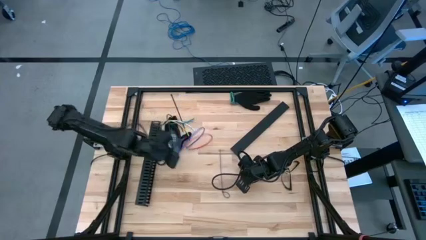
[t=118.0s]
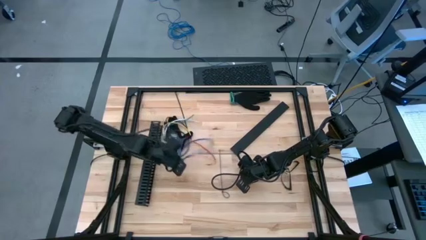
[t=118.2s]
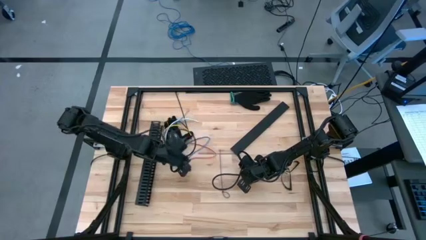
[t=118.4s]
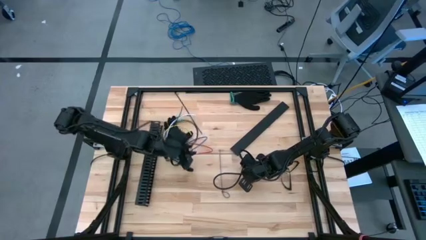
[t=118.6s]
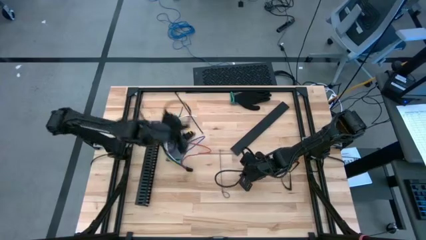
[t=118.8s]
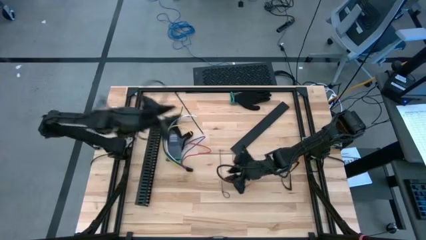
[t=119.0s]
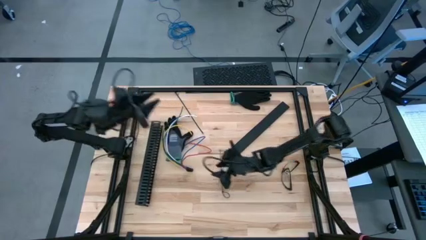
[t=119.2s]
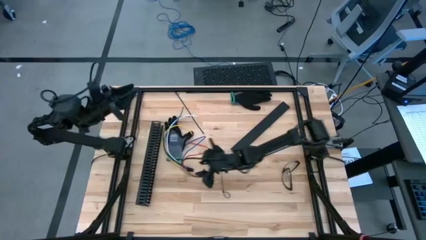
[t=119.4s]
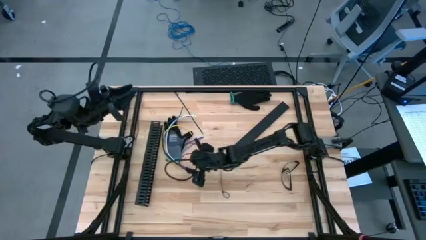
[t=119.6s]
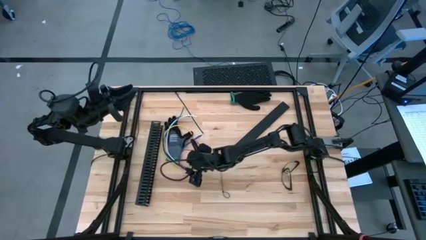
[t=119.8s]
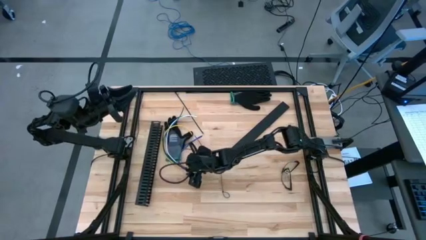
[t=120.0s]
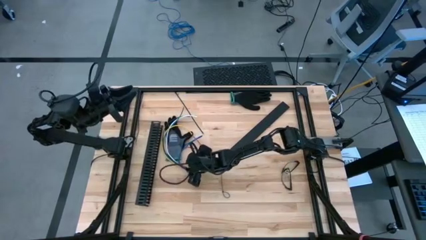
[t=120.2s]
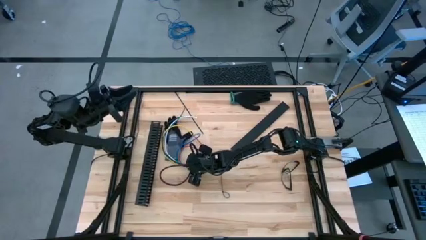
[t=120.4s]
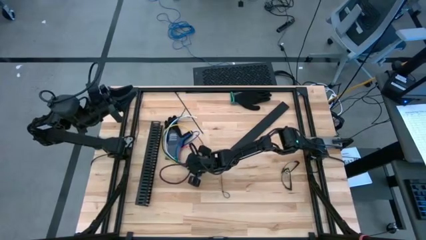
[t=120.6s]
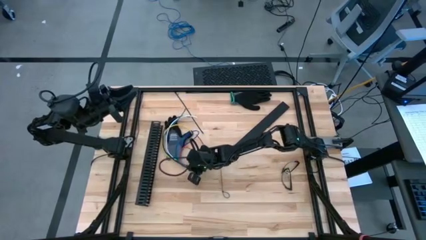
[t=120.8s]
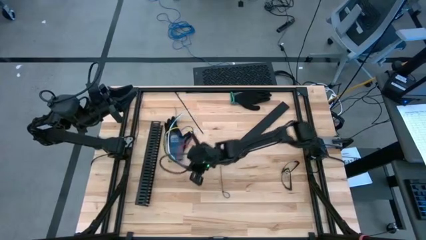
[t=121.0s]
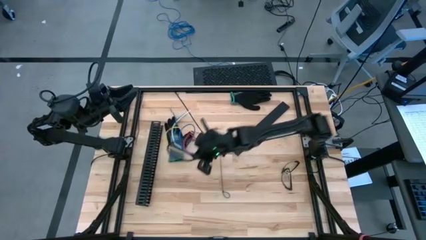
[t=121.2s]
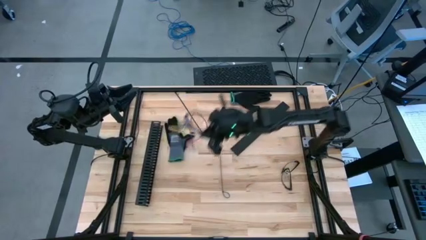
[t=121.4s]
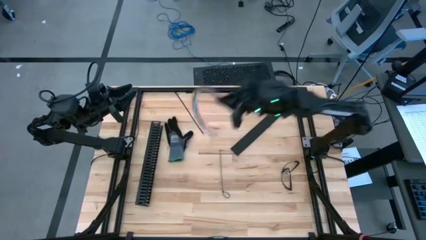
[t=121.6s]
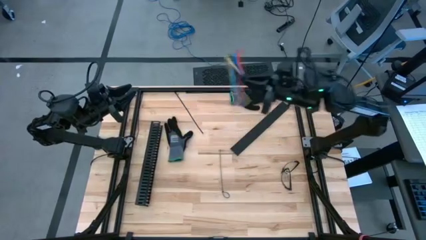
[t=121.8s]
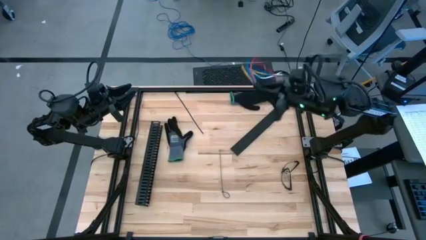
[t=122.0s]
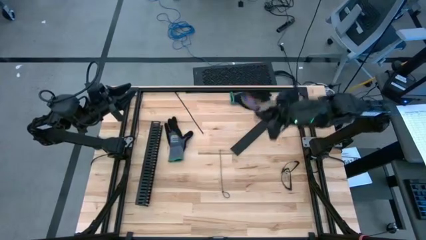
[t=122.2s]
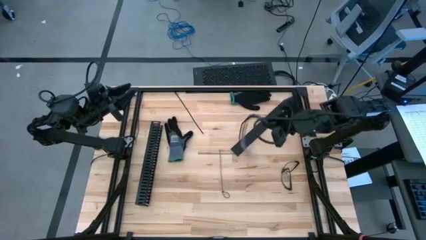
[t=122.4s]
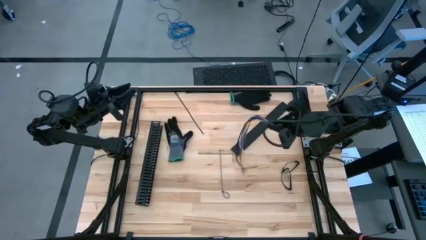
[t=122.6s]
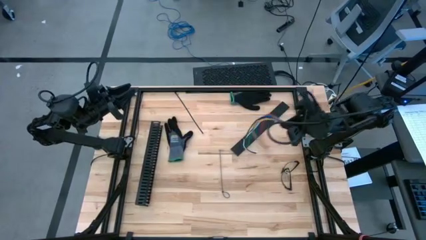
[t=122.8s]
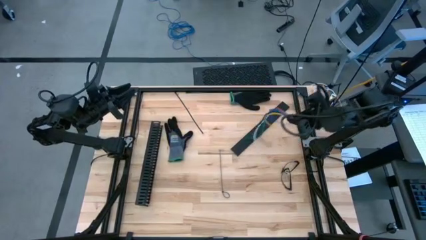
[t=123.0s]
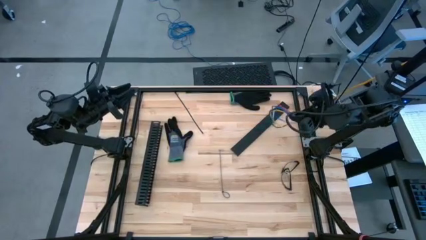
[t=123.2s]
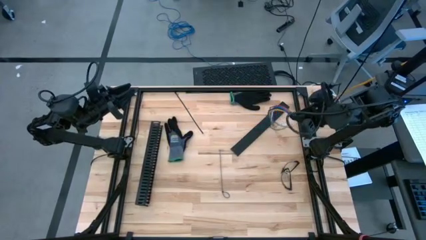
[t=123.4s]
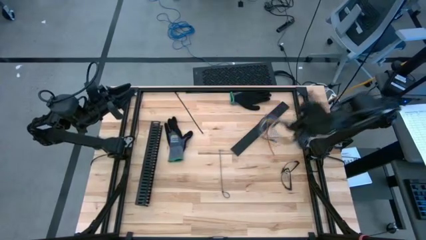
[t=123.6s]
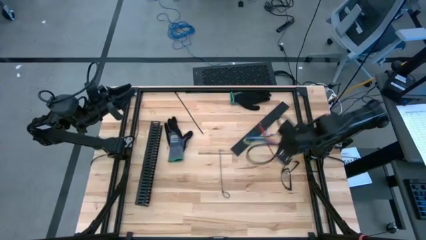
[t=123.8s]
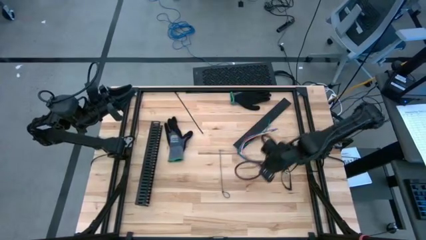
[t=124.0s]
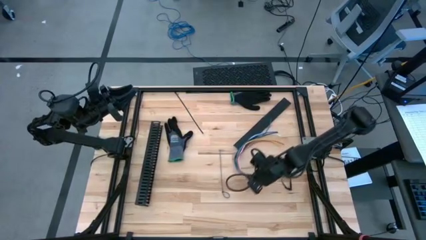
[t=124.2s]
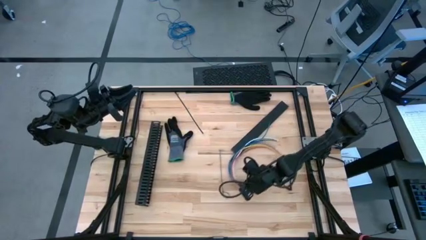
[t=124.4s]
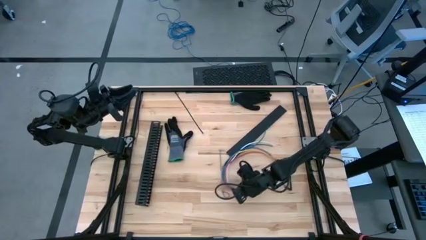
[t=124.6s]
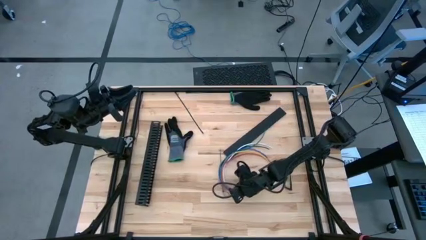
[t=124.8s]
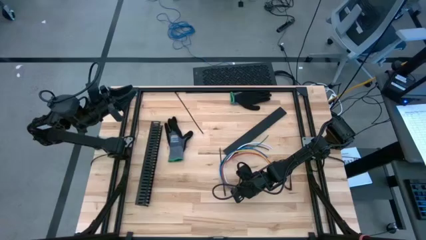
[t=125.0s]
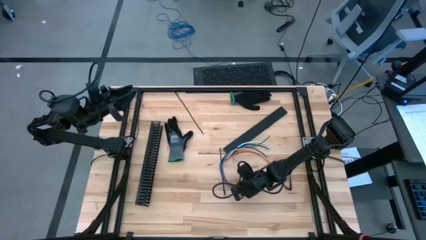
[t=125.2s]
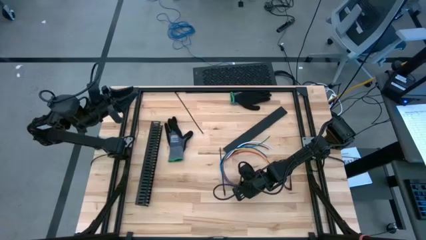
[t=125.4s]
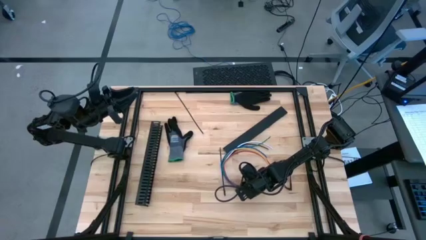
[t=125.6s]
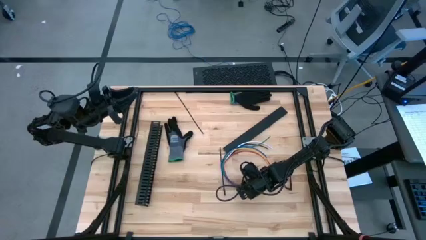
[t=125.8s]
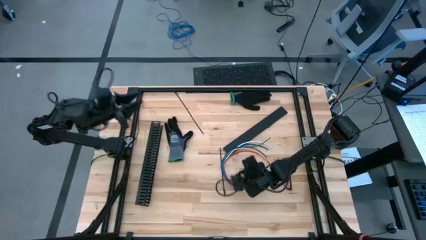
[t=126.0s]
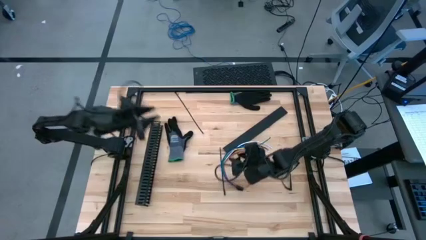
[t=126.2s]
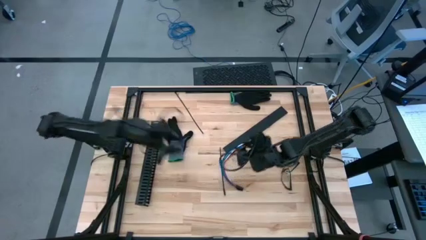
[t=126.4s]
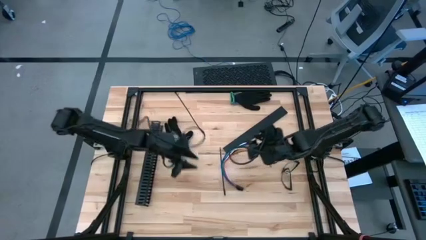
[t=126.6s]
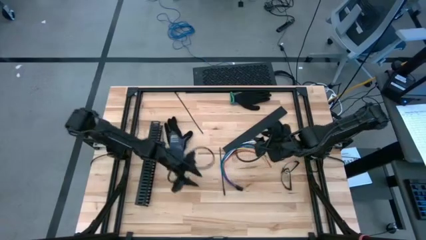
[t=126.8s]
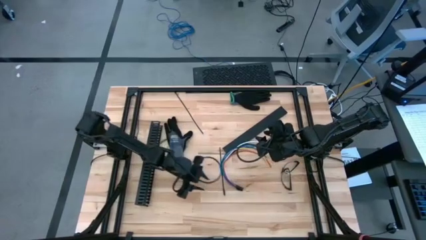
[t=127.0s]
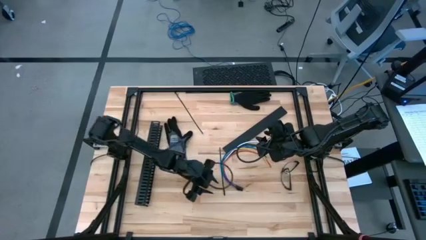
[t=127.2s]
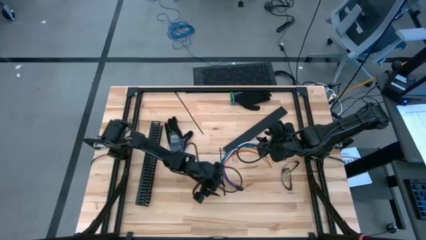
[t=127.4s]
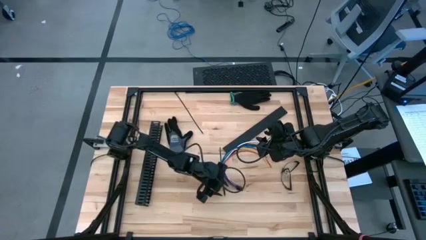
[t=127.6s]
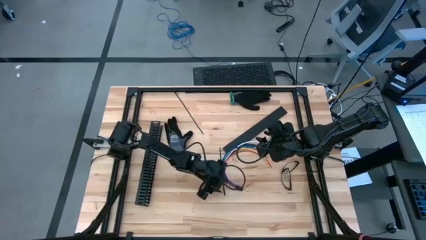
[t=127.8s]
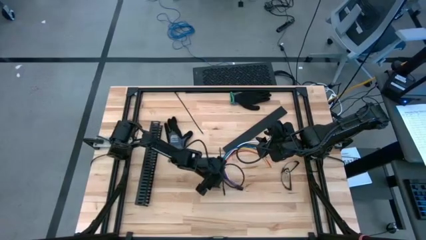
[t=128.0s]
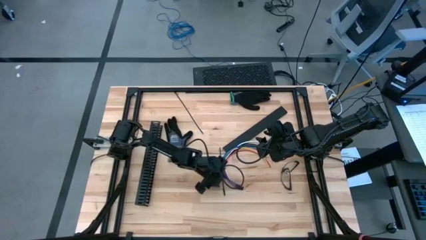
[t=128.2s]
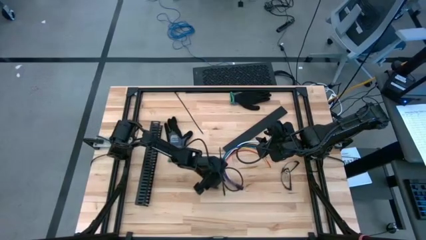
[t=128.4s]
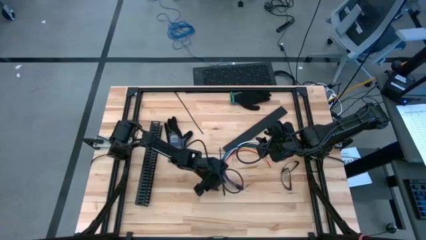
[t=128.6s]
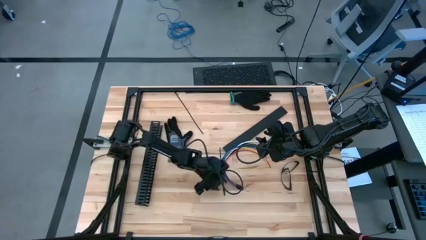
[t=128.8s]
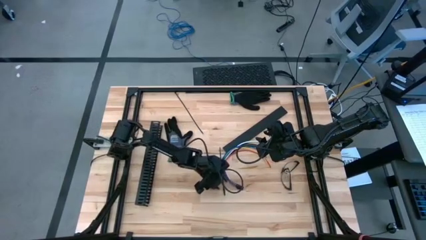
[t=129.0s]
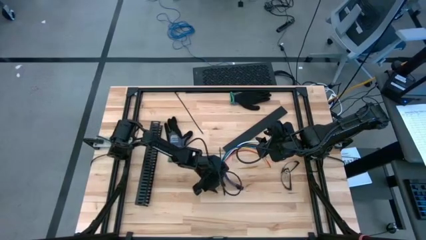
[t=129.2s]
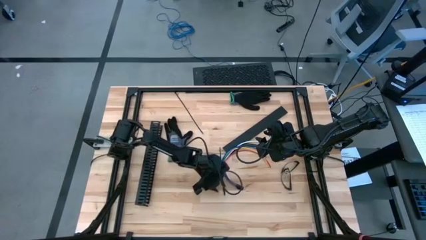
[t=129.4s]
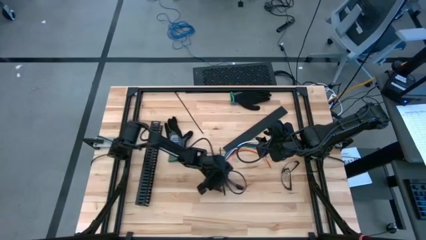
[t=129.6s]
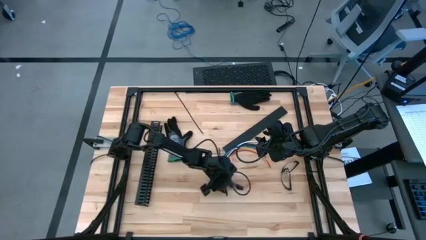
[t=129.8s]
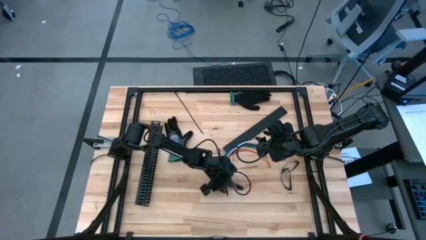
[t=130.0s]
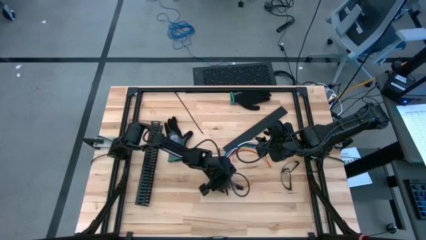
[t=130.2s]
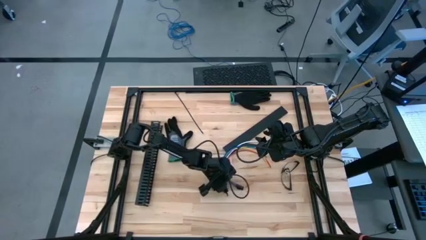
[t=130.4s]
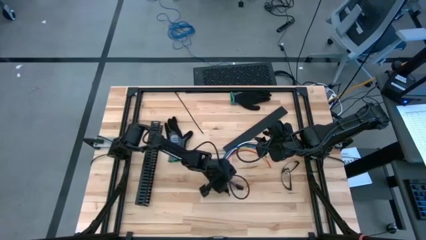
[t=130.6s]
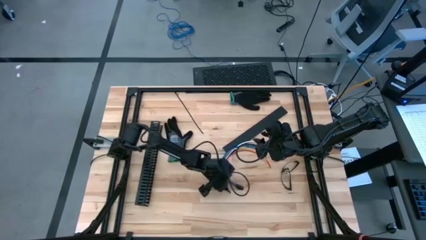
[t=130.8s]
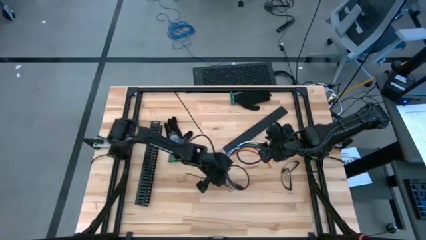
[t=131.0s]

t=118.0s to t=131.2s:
Task: Ziptie cables
Wrap the cable wires with the black zip tie
